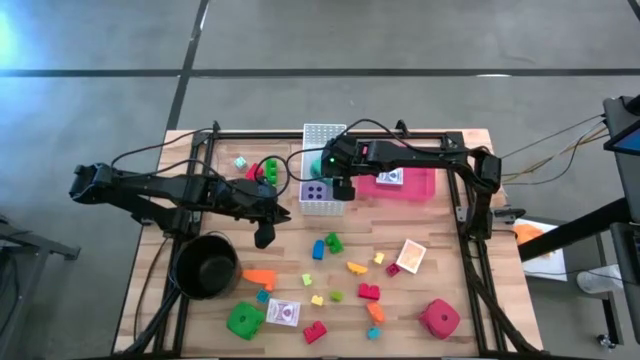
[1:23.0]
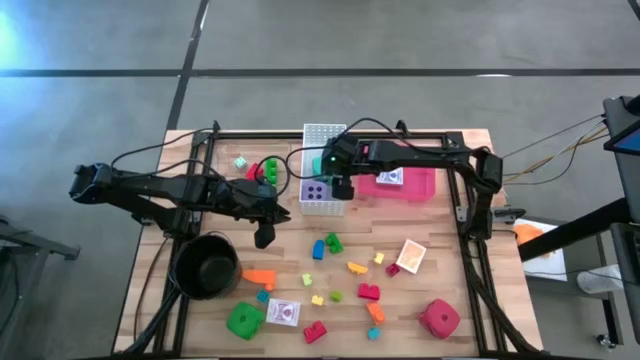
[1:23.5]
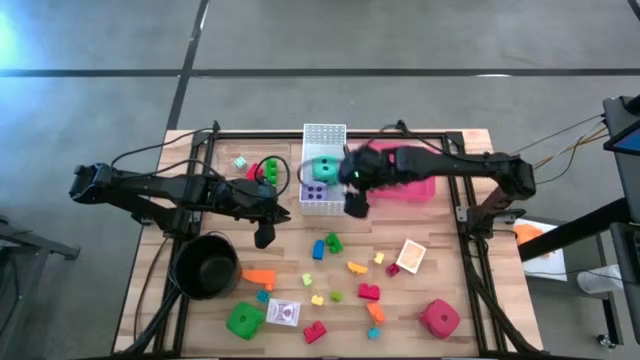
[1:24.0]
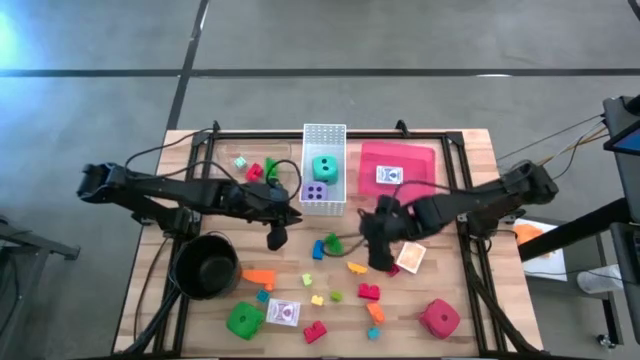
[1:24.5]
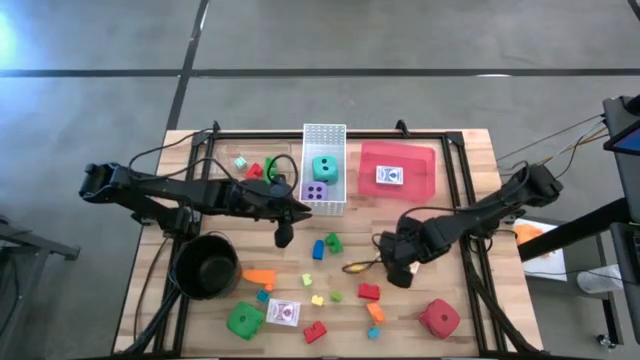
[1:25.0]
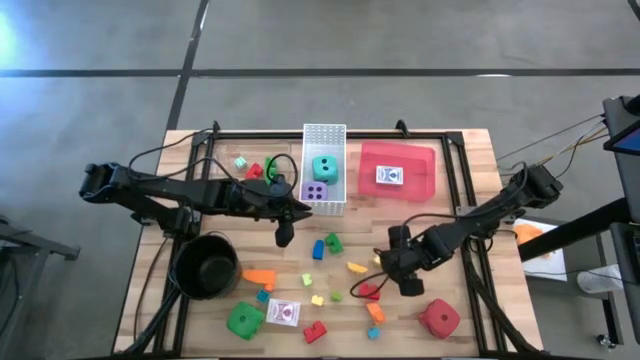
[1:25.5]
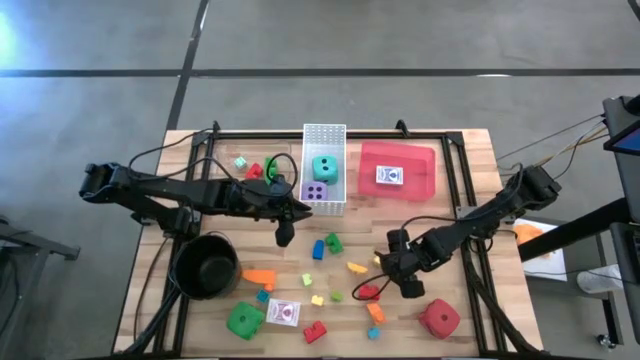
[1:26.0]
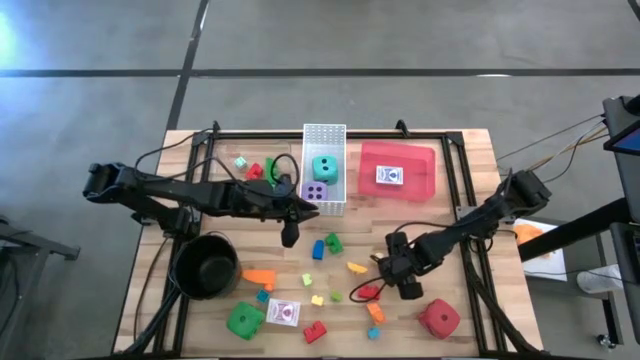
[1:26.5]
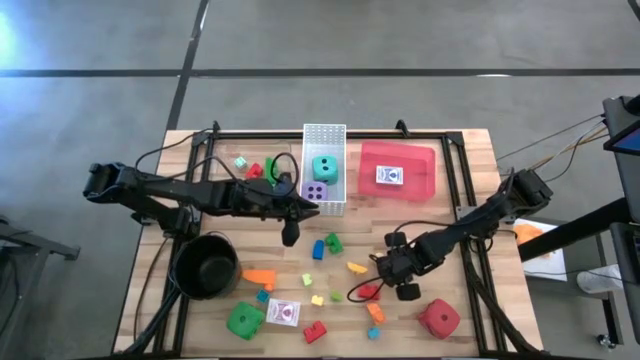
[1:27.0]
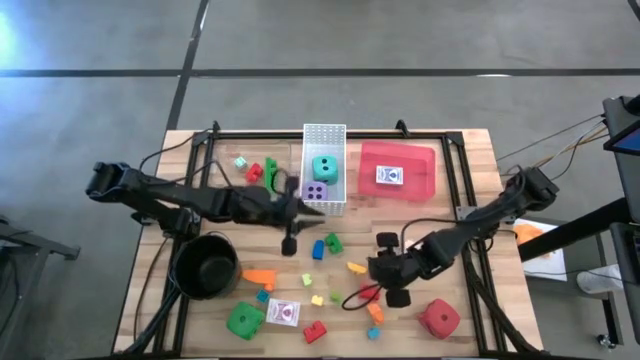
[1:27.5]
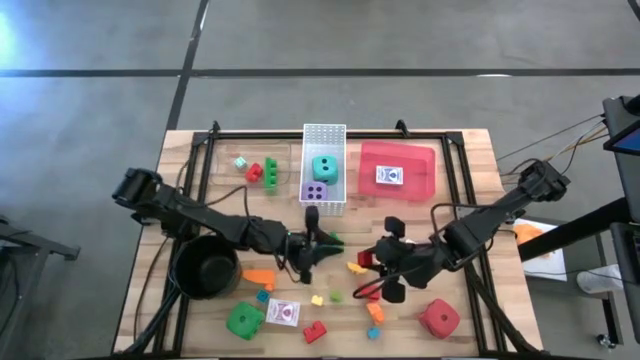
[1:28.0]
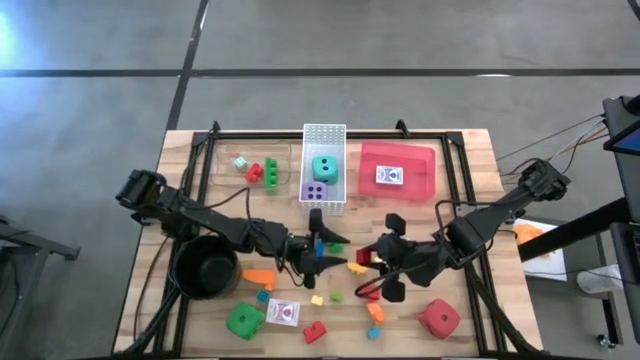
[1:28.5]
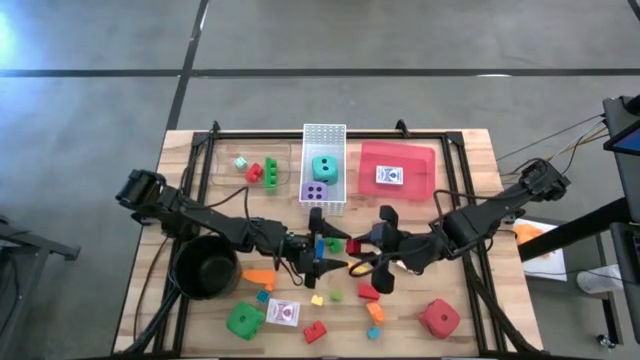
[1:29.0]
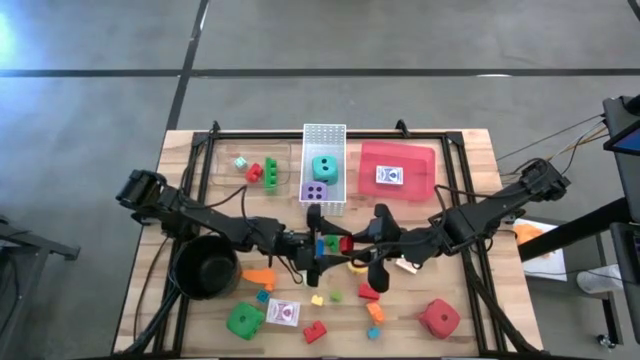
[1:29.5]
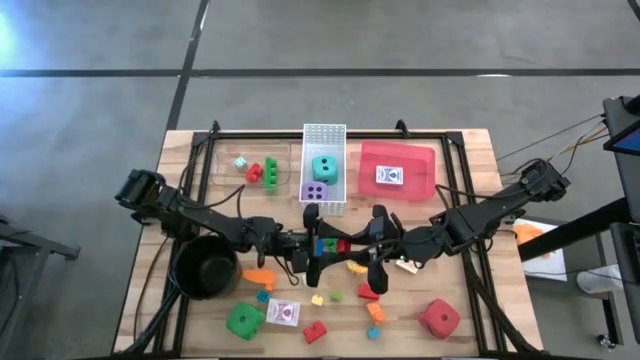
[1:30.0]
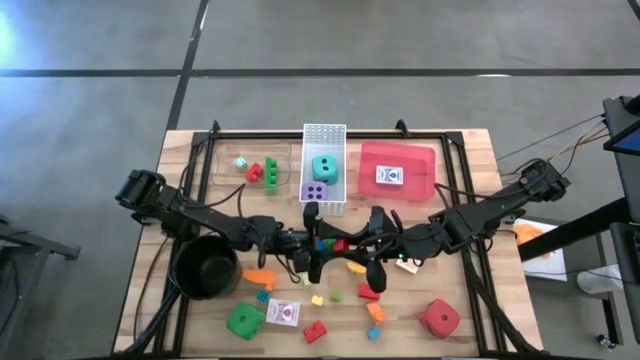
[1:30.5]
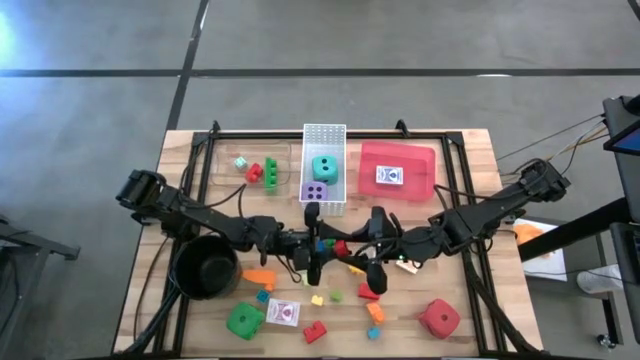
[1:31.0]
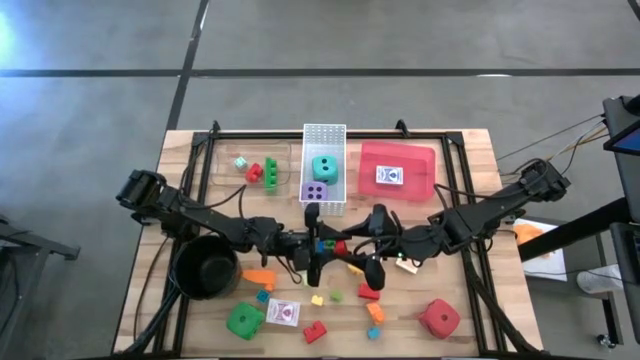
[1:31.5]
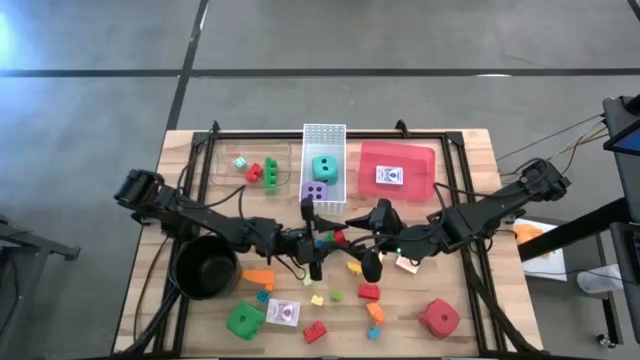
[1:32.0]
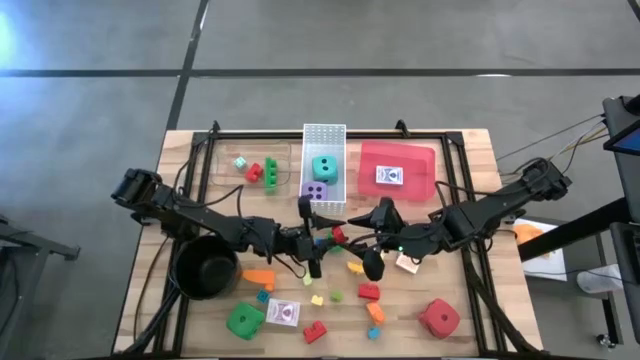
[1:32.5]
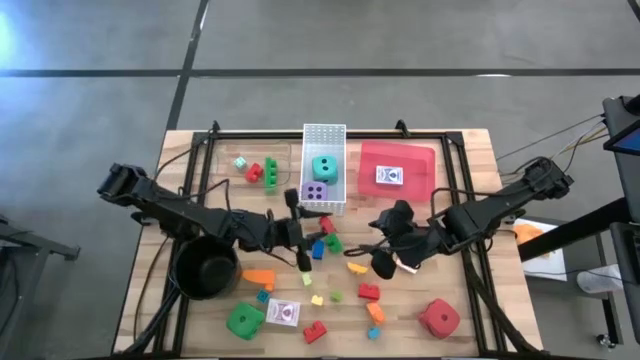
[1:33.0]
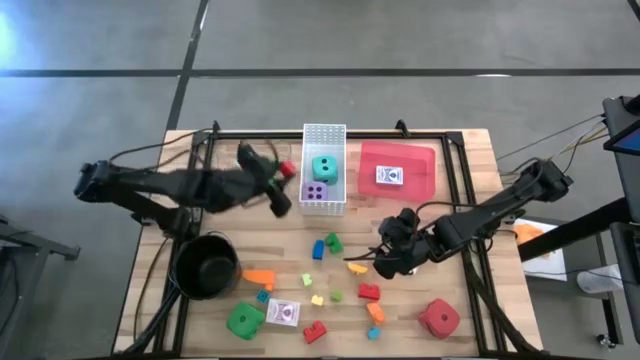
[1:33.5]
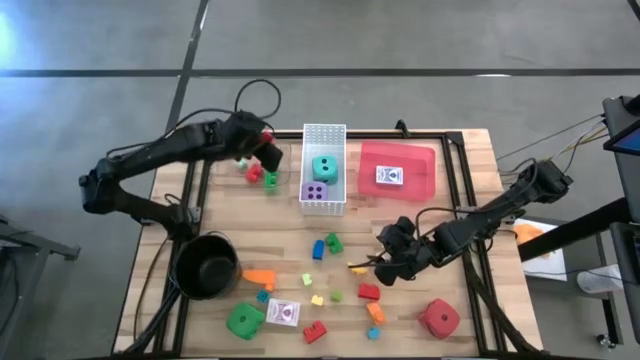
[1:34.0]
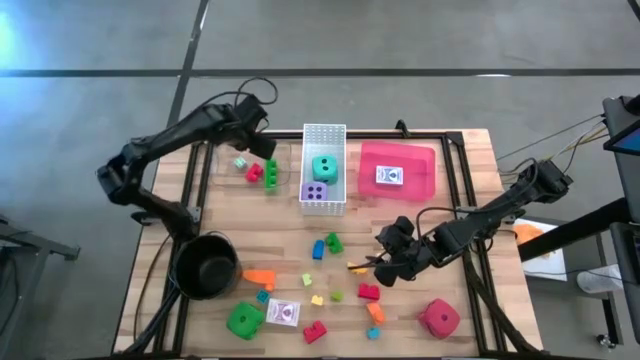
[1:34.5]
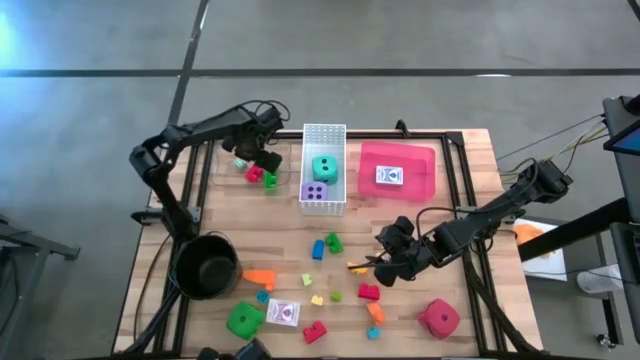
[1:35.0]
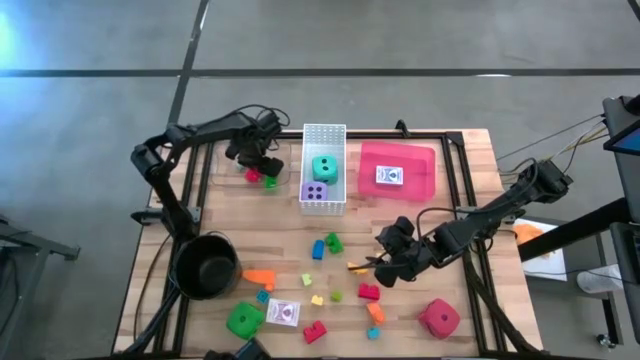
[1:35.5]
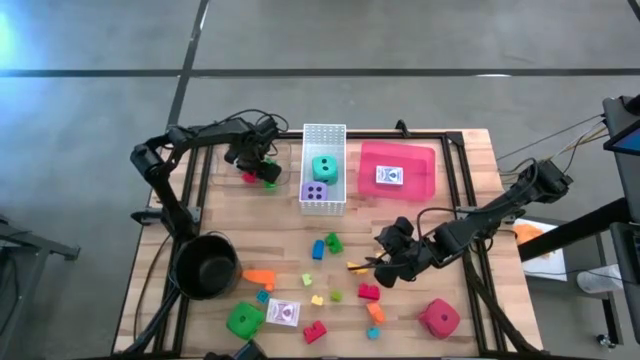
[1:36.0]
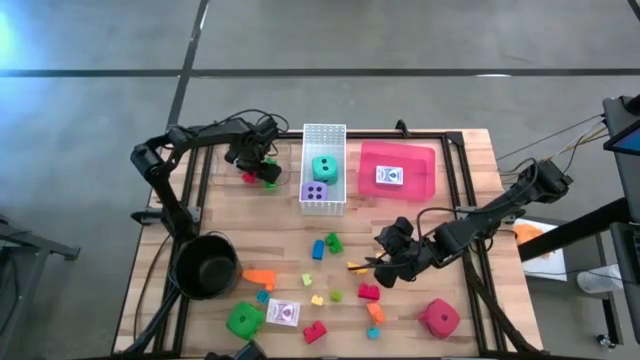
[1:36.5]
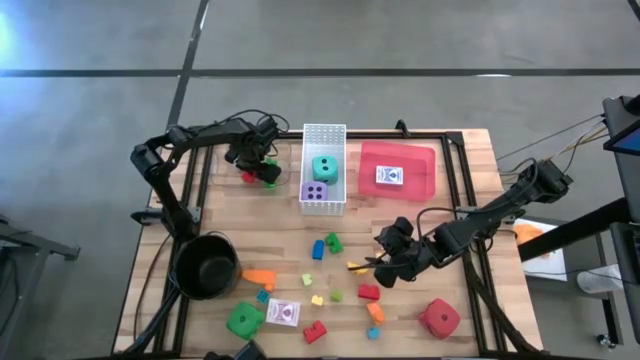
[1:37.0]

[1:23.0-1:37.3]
Task: Pick & Place Toys
Put the red game piece into the transparent bin

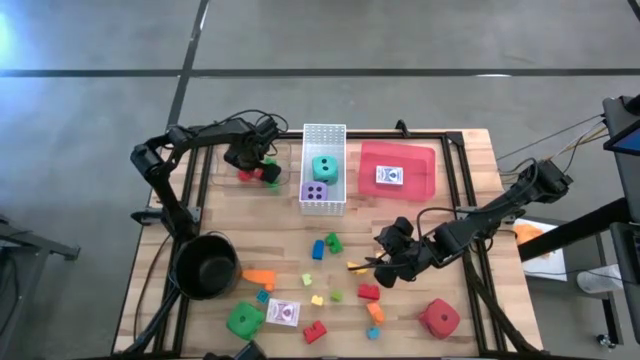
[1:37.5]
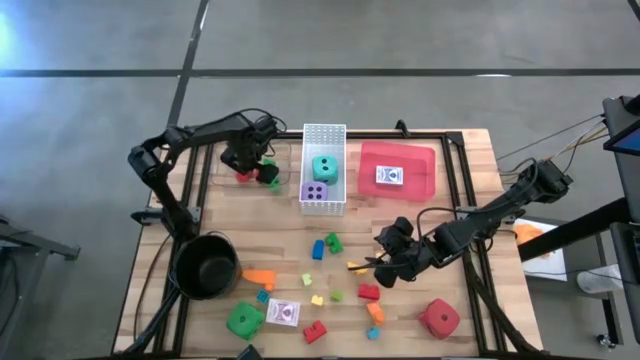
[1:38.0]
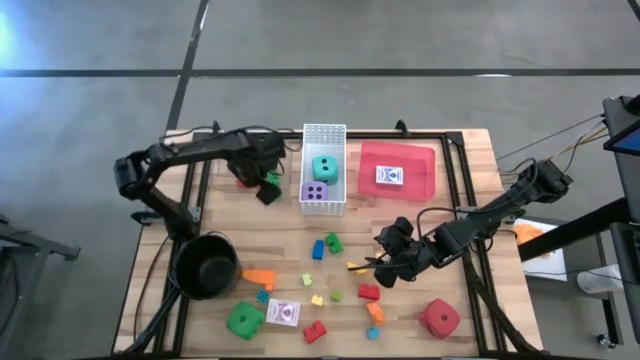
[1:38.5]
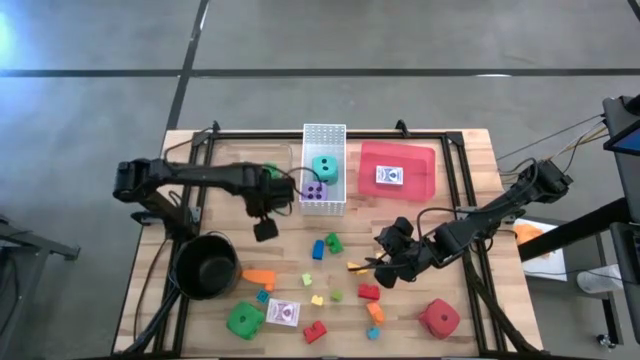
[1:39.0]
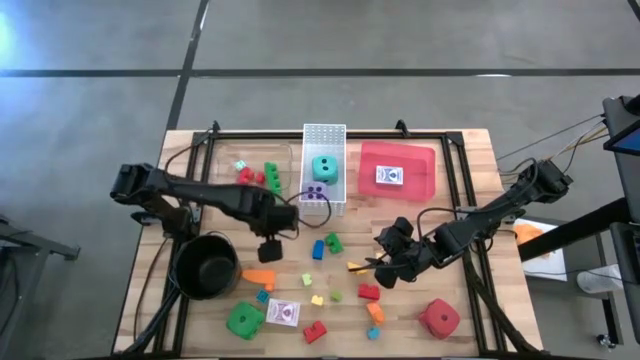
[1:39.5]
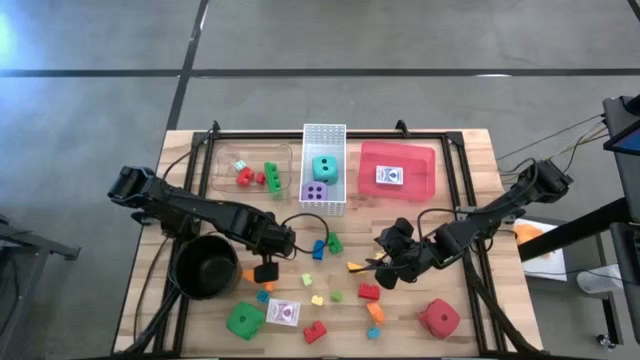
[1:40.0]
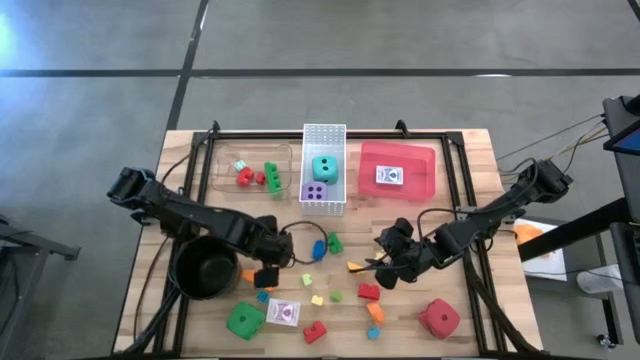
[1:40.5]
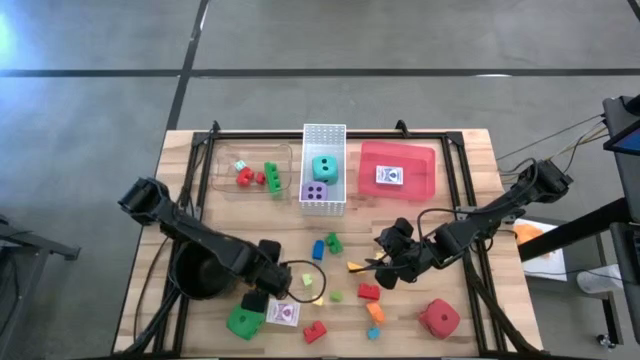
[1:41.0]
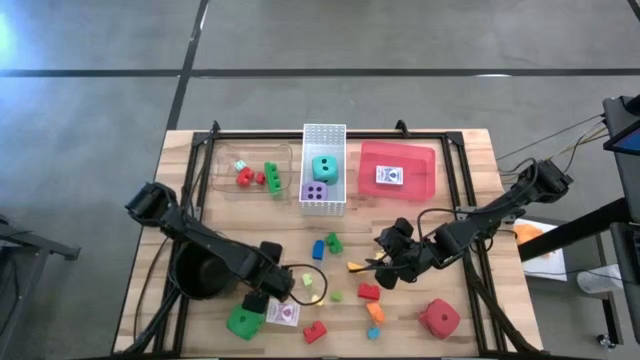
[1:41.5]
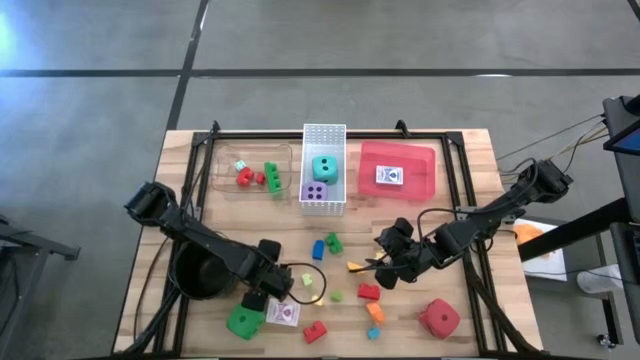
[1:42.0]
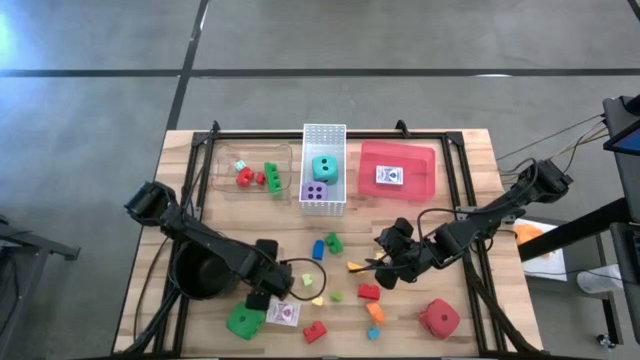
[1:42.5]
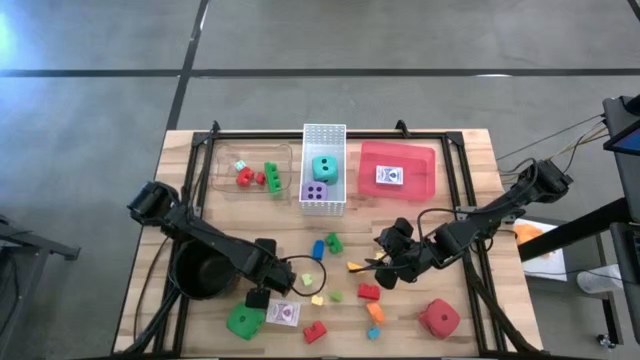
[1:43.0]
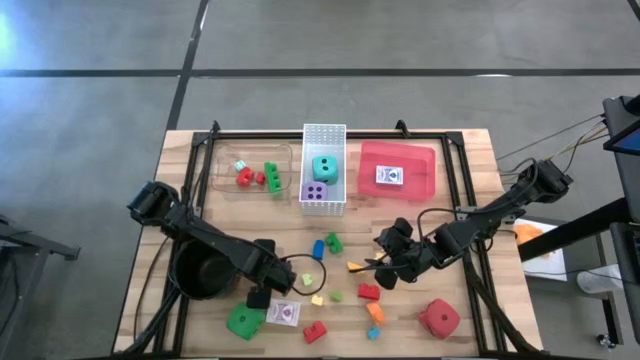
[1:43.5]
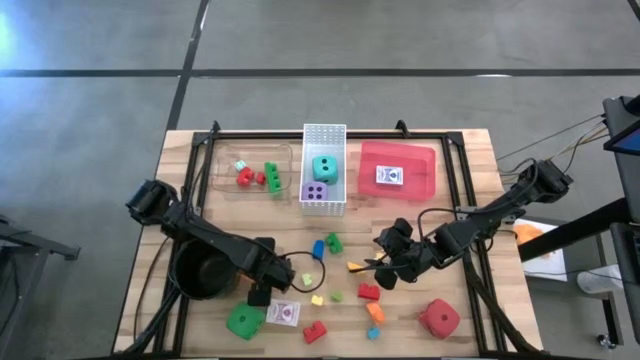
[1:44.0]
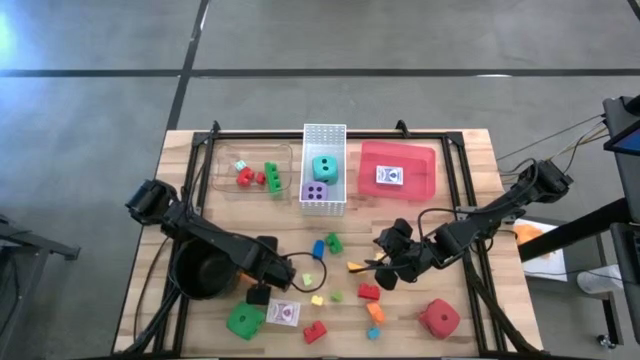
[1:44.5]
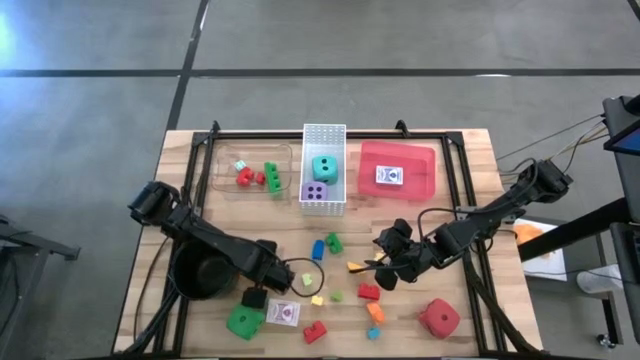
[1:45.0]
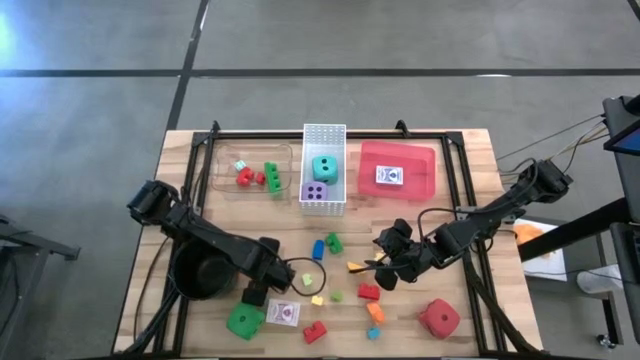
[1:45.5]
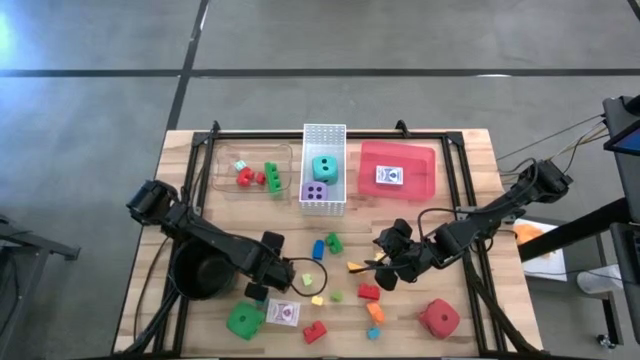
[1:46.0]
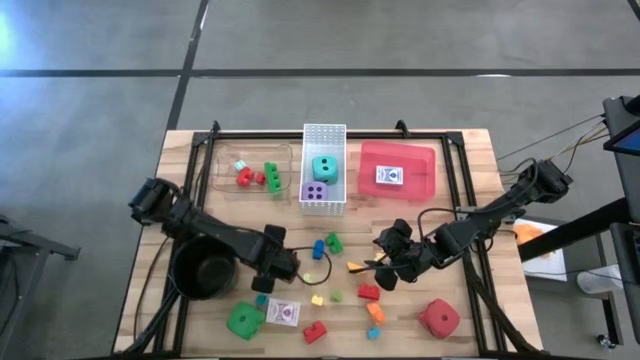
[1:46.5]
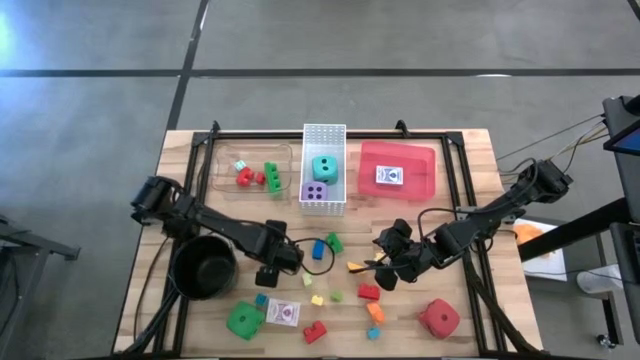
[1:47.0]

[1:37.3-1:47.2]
Put the orange game piece into the transparent bin
